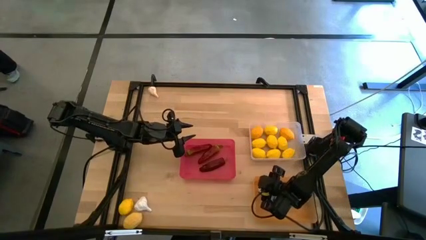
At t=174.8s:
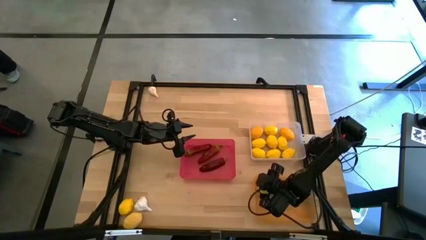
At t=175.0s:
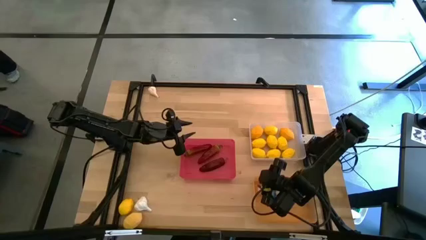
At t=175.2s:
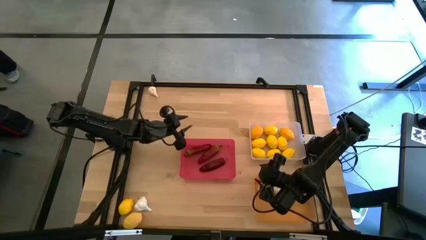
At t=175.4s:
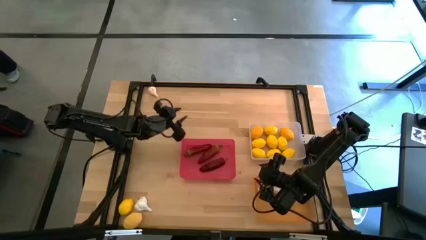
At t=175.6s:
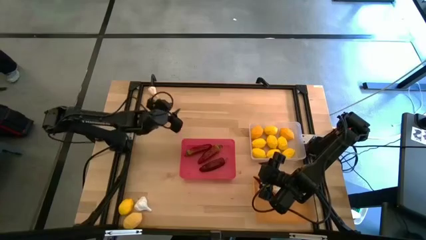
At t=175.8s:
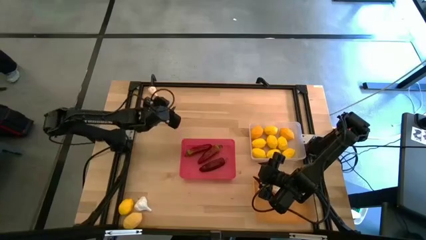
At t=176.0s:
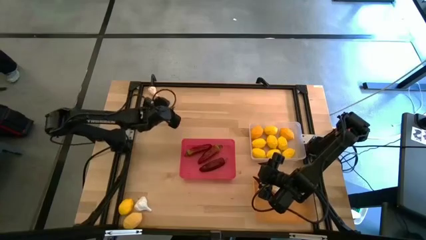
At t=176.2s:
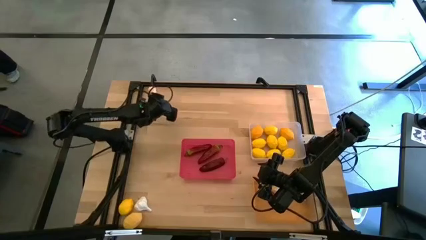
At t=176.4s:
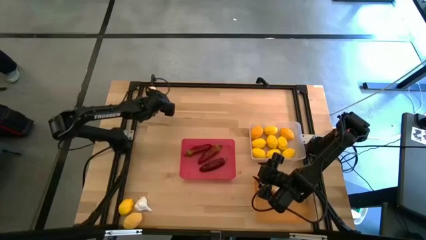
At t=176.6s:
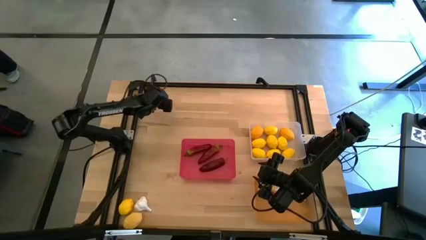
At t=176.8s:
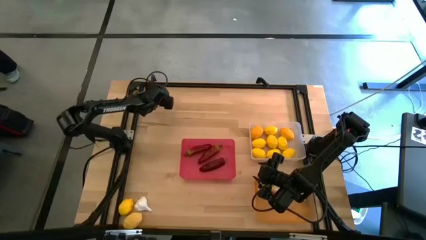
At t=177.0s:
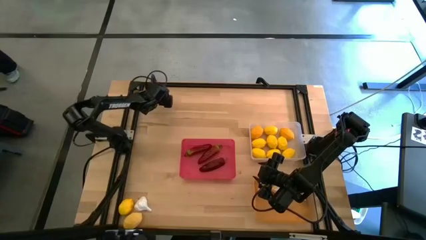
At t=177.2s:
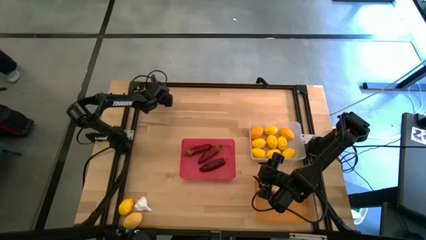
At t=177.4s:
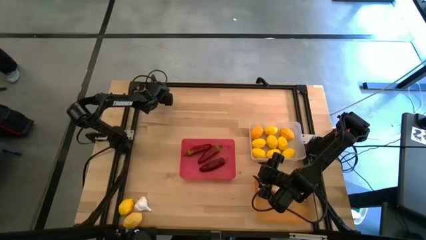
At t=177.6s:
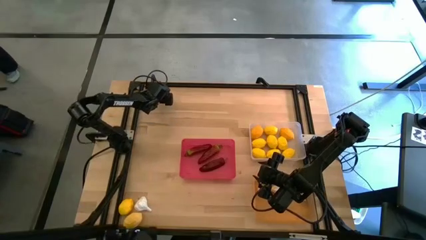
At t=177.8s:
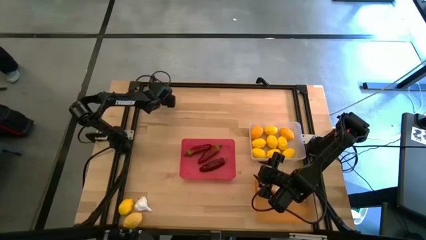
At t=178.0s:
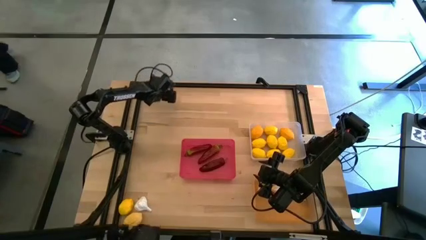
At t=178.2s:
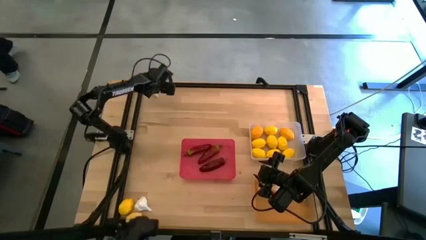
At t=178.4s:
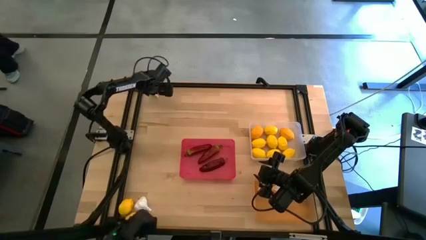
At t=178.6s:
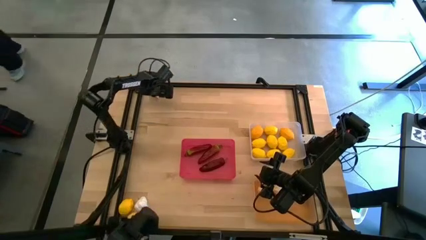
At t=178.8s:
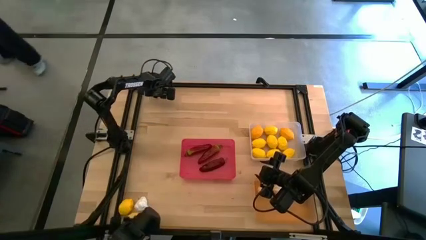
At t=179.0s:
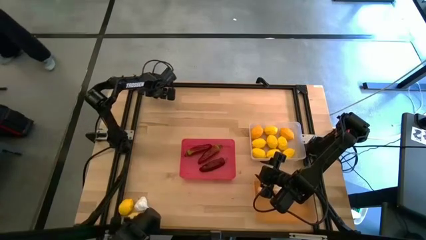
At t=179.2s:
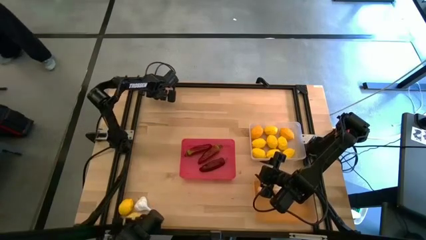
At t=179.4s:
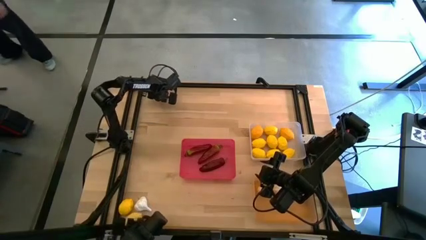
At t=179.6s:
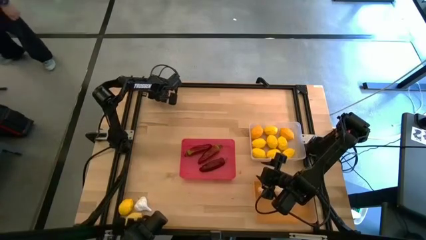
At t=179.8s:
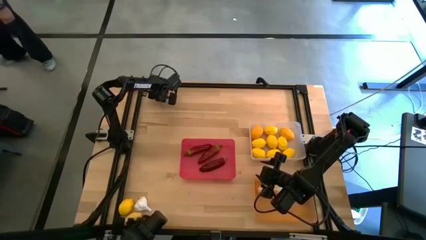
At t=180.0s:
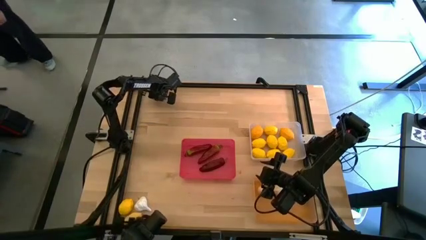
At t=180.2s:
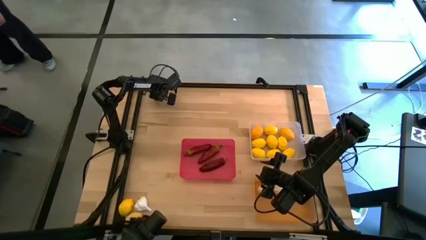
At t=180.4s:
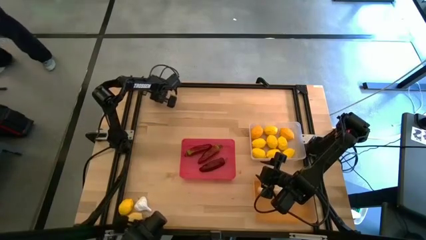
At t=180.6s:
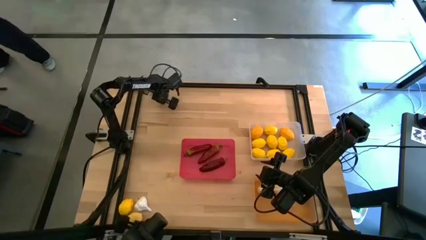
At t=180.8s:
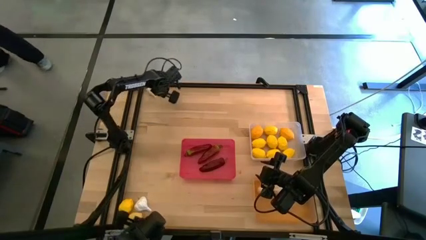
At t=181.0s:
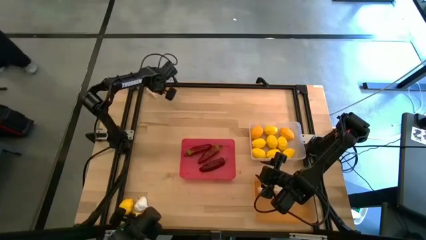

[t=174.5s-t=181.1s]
Task: Sort produce into baskets
Put the white garlic into the orange bin

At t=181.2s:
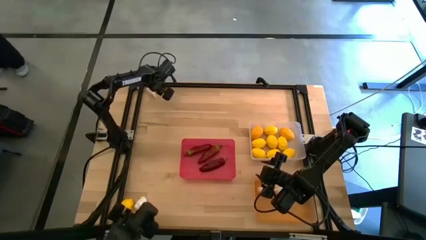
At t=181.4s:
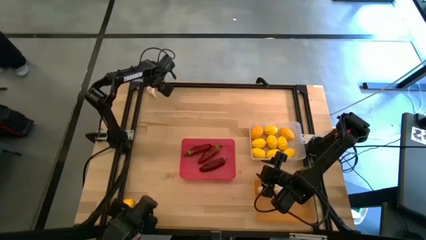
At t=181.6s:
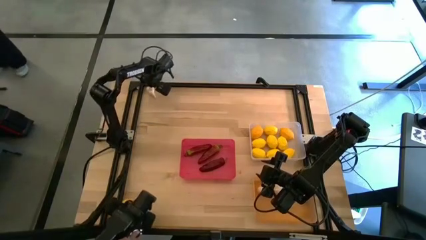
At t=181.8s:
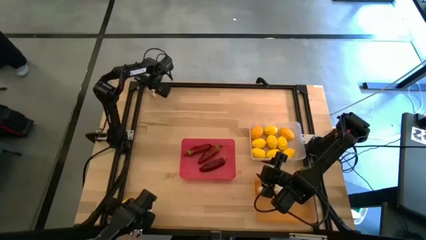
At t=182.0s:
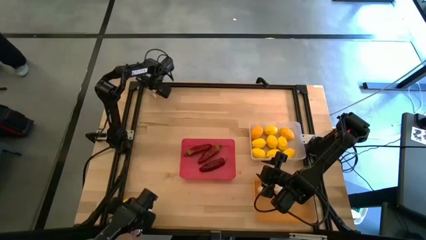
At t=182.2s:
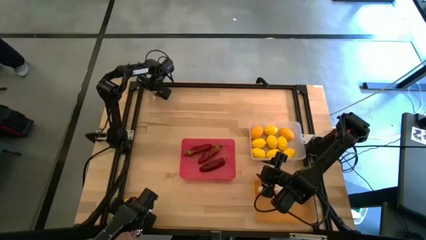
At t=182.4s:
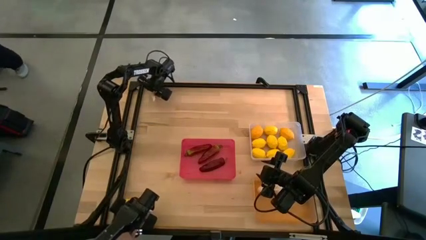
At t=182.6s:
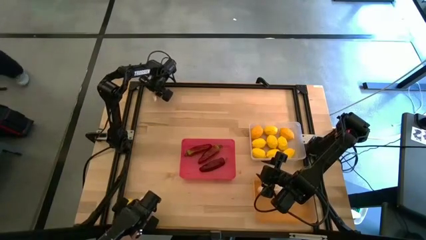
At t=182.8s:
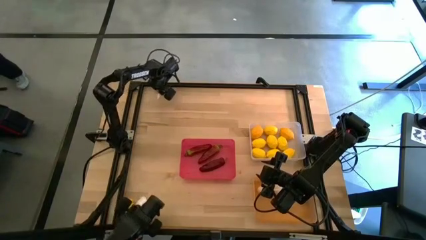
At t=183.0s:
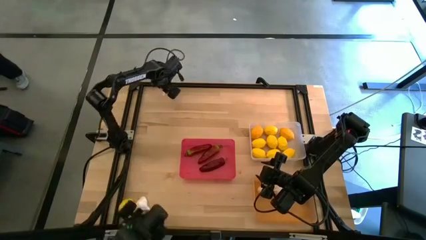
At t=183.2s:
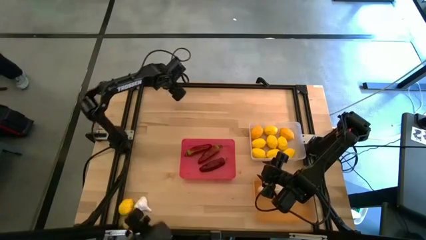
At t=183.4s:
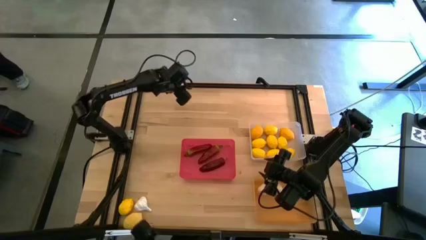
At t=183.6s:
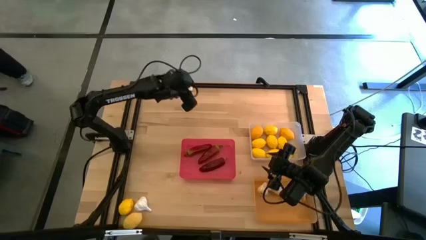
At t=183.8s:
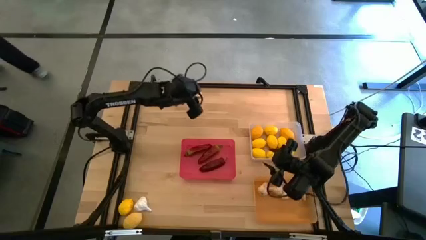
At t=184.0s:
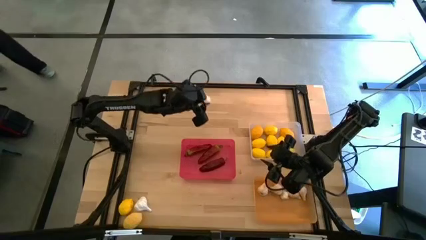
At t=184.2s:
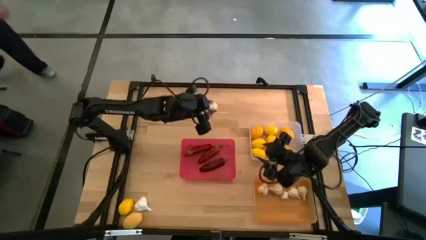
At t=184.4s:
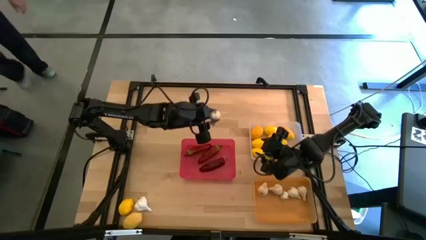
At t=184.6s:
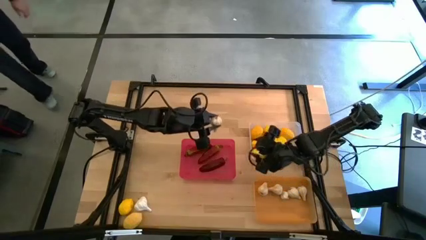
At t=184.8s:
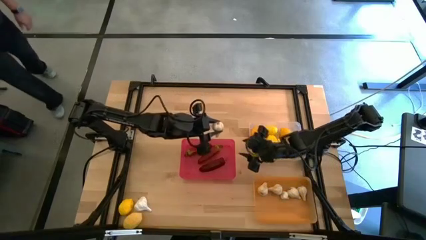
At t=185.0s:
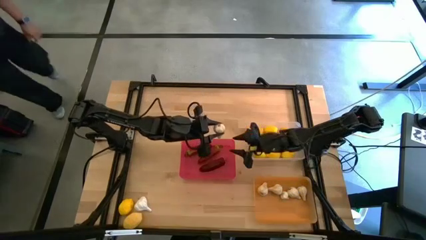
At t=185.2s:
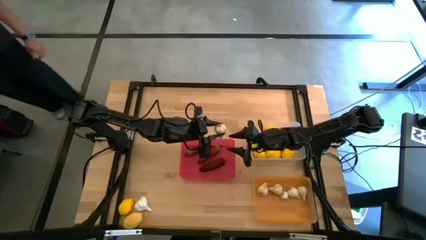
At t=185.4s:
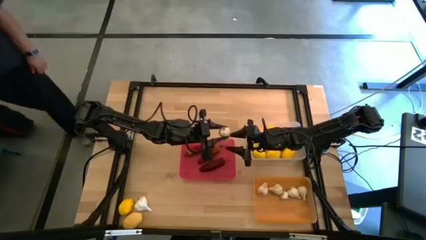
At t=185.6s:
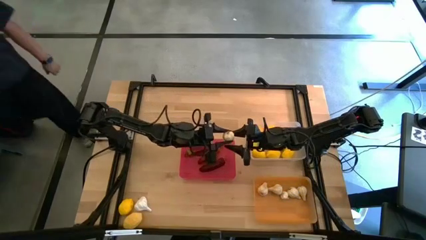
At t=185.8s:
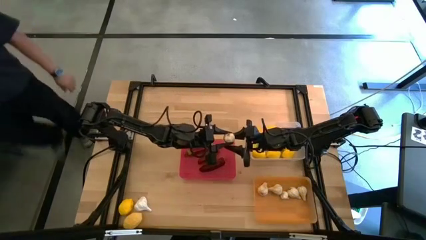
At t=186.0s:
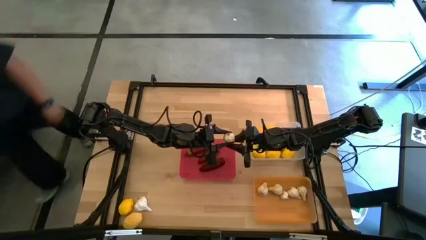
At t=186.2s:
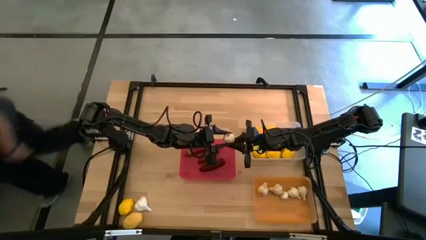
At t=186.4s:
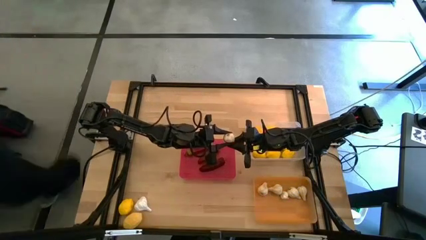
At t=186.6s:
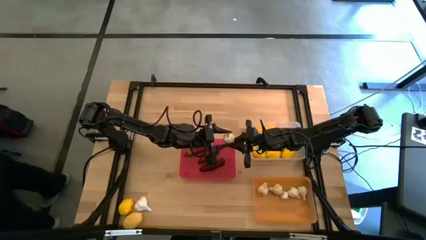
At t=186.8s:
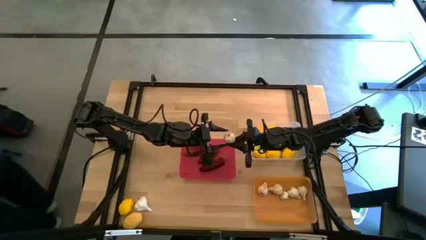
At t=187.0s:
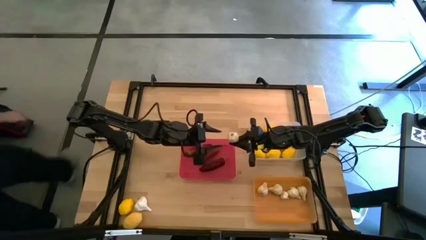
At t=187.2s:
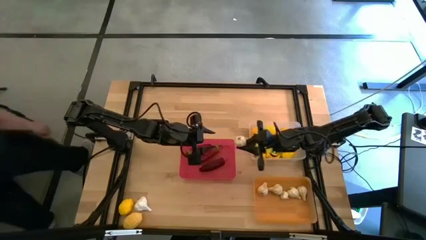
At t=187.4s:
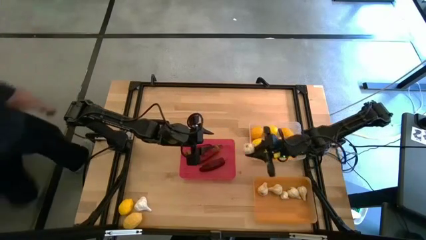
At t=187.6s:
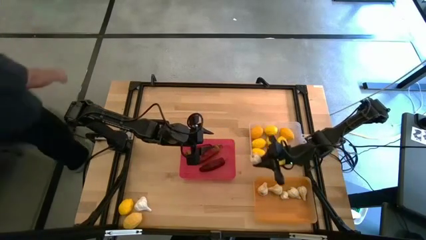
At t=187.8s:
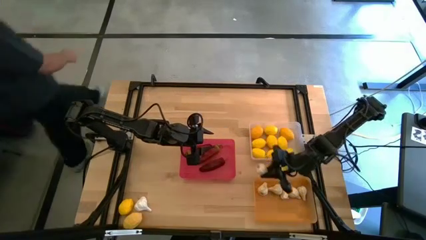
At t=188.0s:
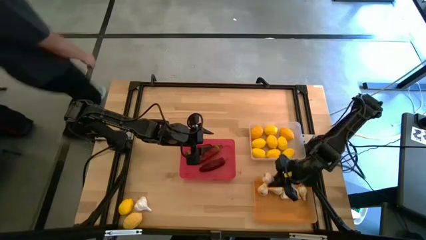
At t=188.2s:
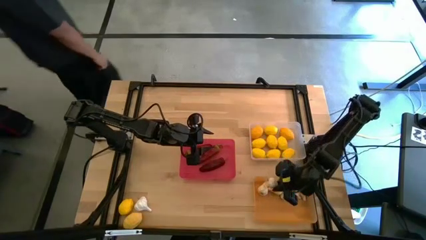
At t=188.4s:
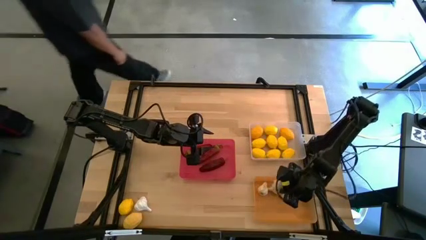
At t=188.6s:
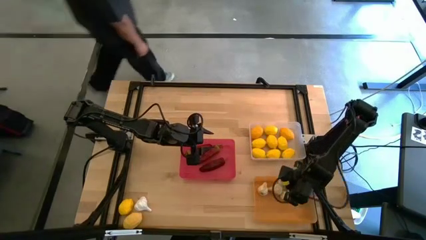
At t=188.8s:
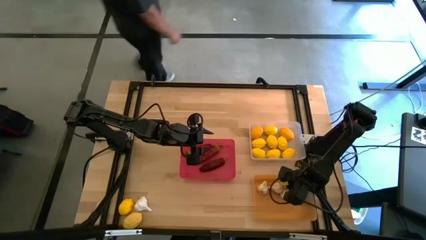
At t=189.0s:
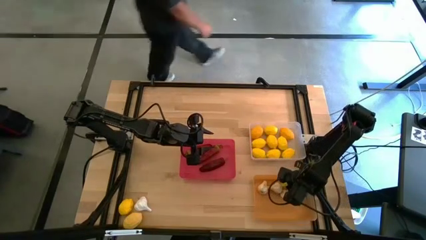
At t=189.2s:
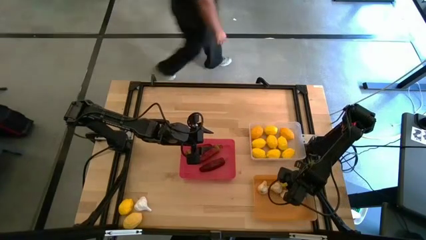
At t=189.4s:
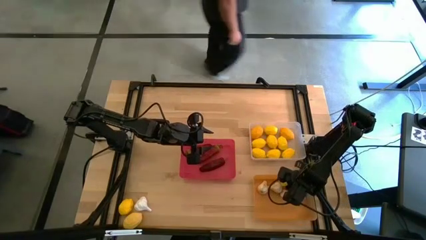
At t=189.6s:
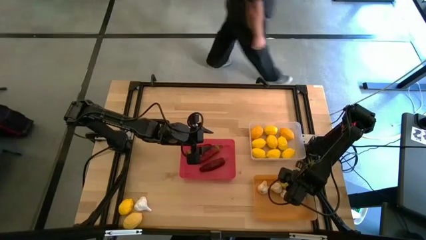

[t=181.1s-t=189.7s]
Put the white garlic into the orange bin

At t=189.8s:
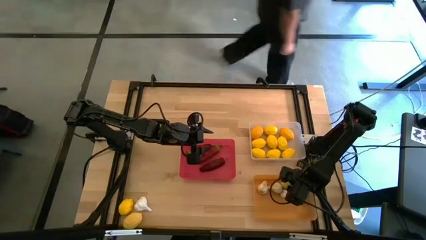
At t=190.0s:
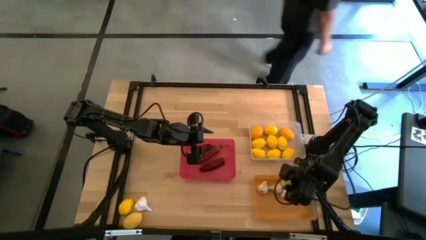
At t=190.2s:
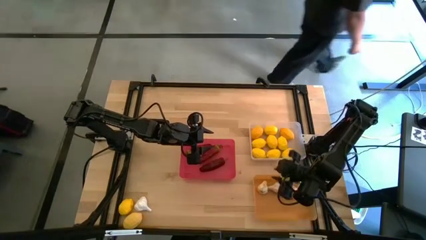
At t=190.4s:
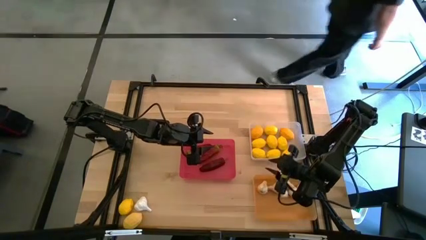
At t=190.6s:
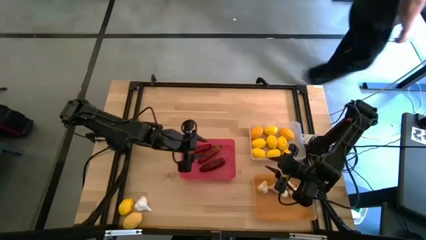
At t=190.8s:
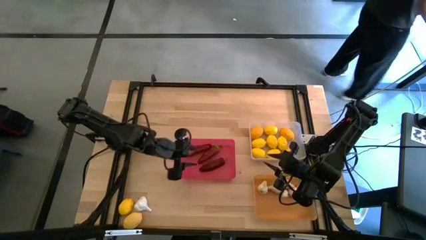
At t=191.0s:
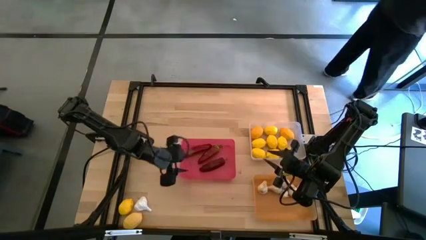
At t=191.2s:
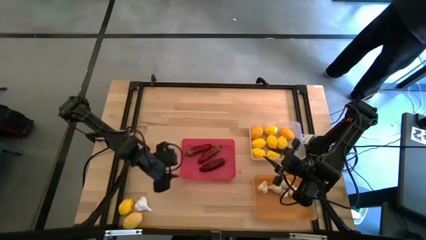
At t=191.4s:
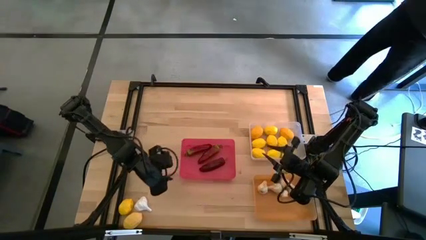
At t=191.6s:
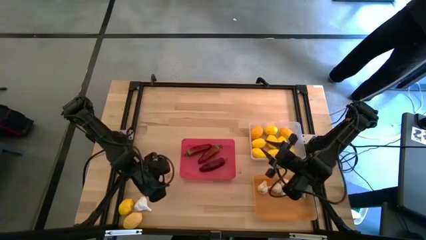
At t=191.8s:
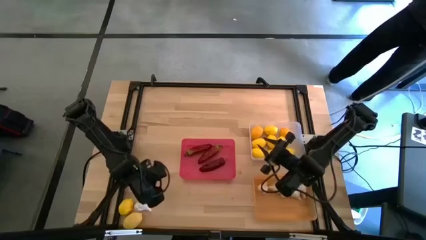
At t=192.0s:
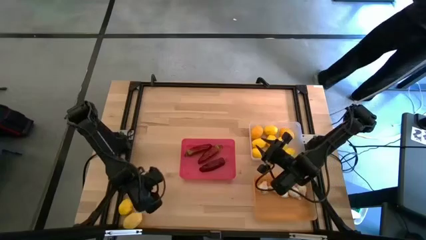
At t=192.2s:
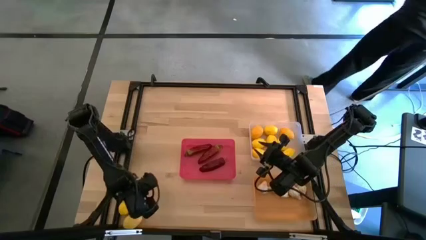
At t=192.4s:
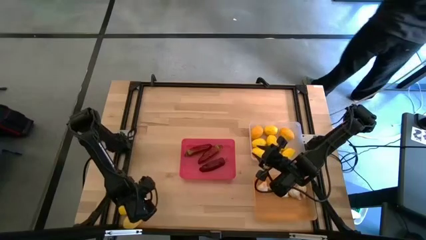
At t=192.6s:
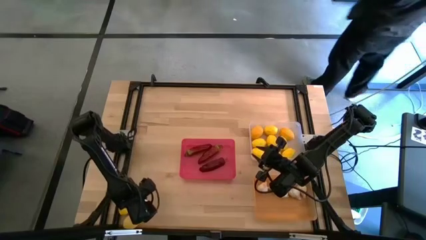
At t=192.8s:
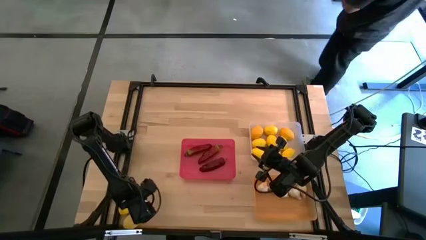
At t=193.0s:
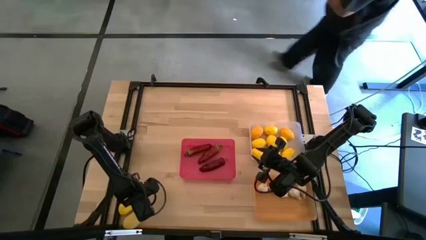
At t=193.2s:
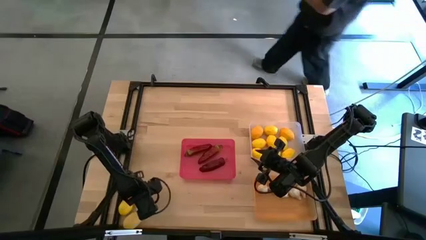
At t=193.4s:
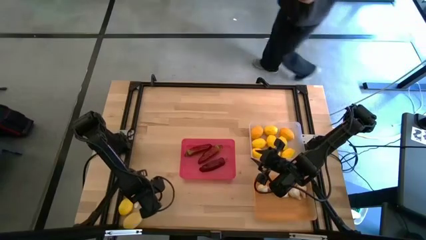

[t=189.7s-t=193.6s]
Put the white garlic into the orange bin
